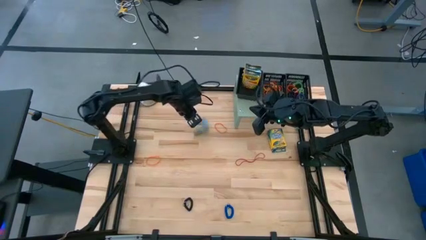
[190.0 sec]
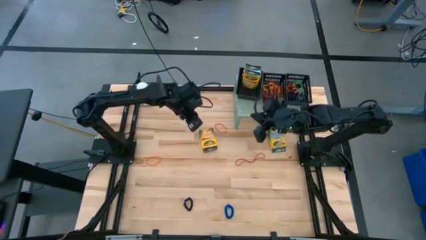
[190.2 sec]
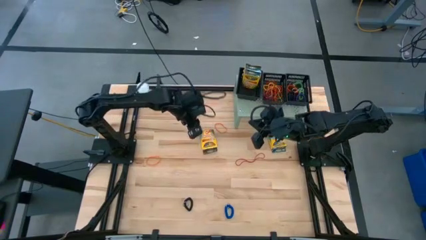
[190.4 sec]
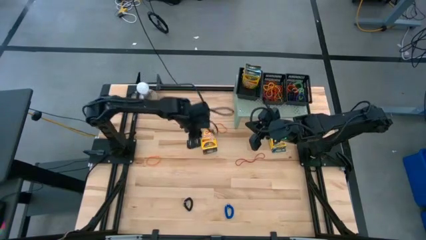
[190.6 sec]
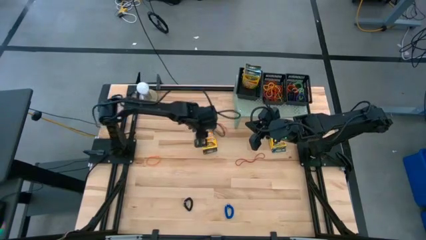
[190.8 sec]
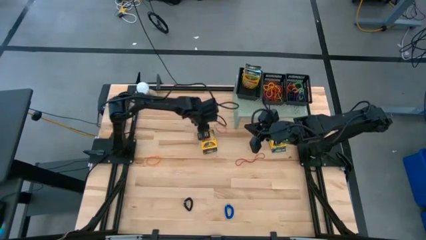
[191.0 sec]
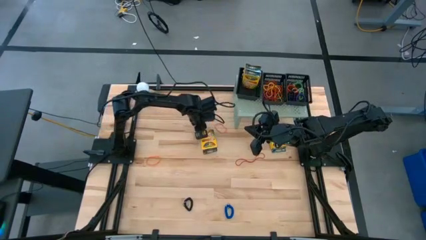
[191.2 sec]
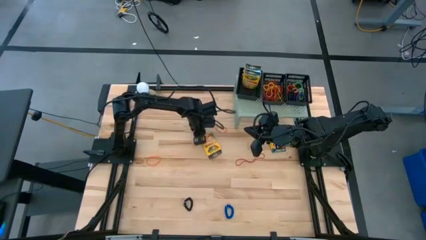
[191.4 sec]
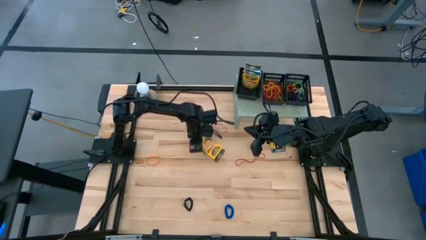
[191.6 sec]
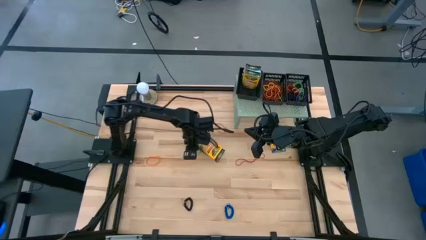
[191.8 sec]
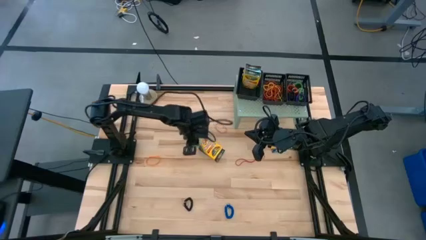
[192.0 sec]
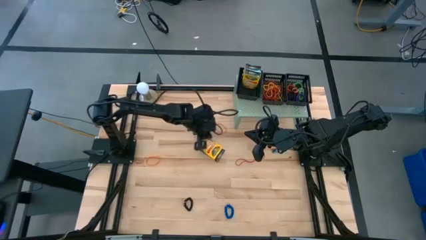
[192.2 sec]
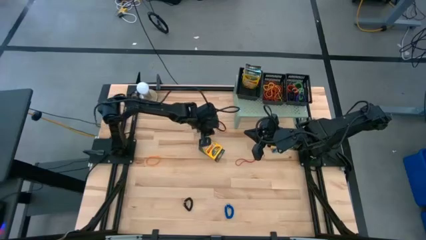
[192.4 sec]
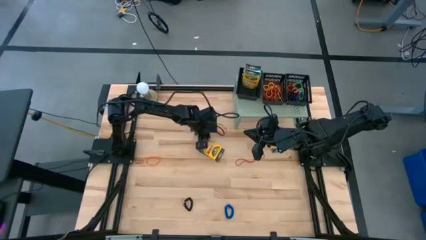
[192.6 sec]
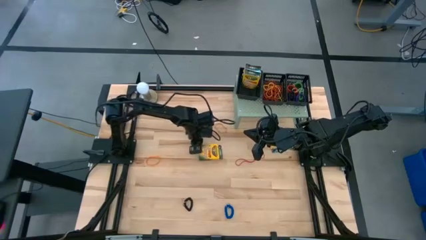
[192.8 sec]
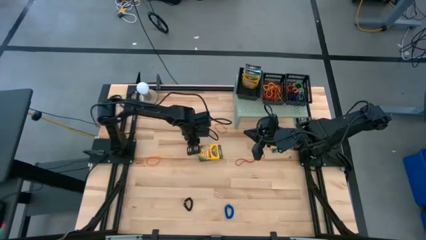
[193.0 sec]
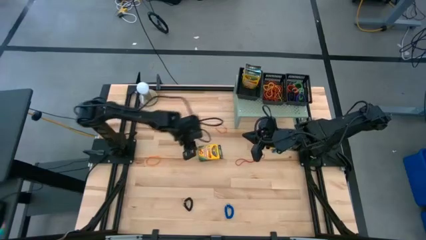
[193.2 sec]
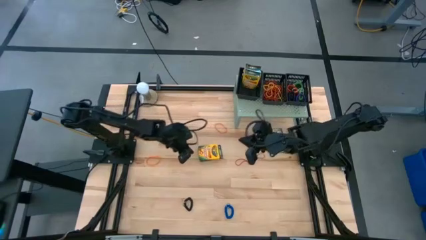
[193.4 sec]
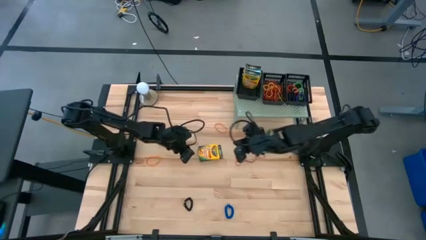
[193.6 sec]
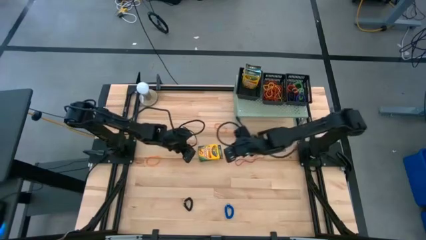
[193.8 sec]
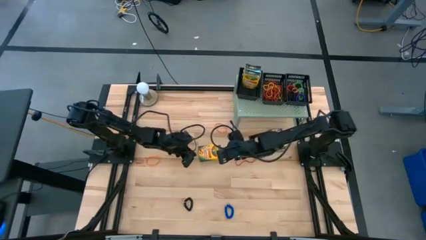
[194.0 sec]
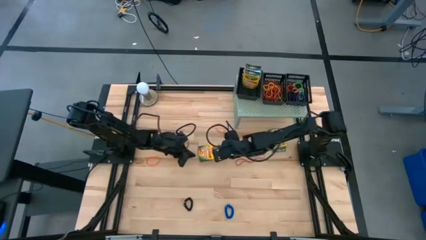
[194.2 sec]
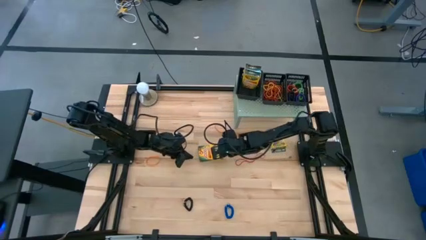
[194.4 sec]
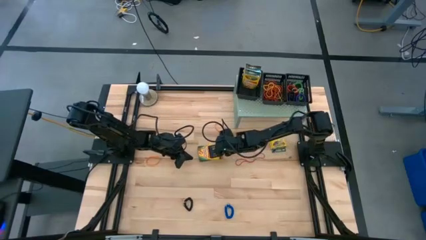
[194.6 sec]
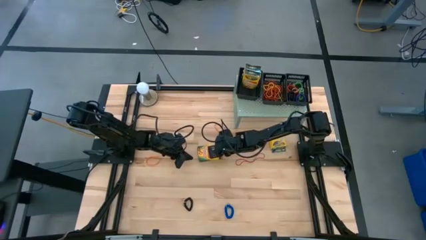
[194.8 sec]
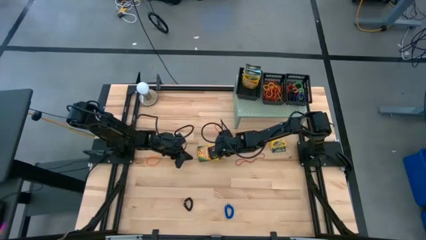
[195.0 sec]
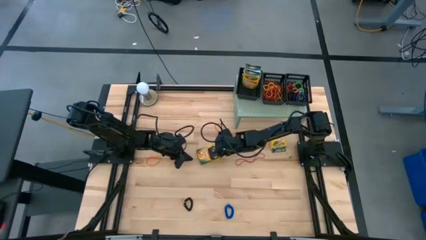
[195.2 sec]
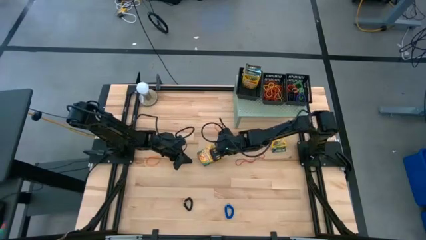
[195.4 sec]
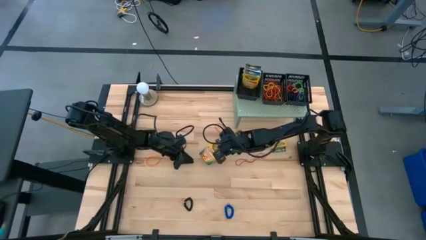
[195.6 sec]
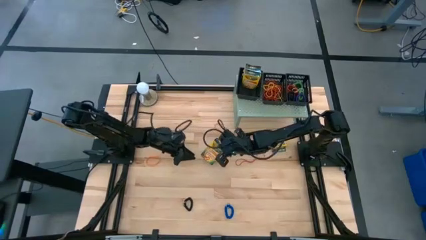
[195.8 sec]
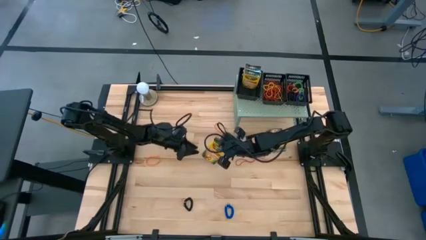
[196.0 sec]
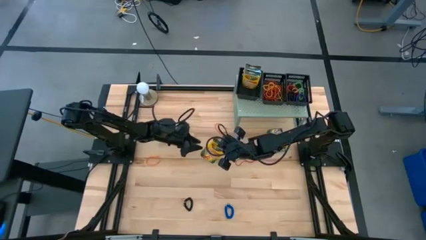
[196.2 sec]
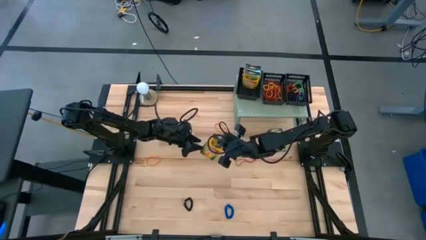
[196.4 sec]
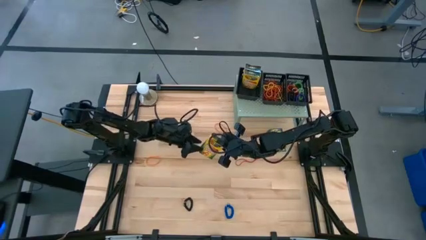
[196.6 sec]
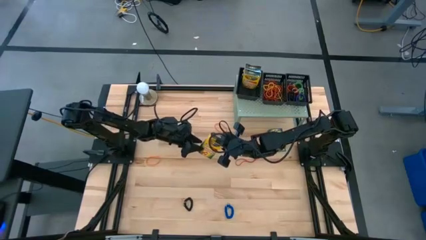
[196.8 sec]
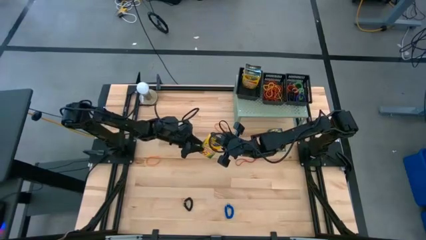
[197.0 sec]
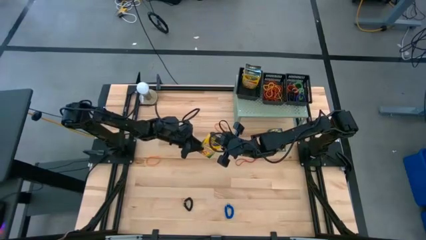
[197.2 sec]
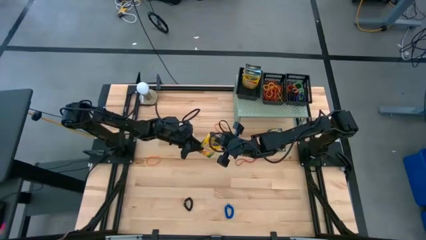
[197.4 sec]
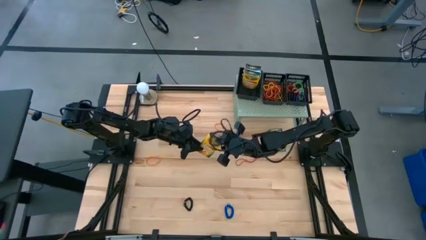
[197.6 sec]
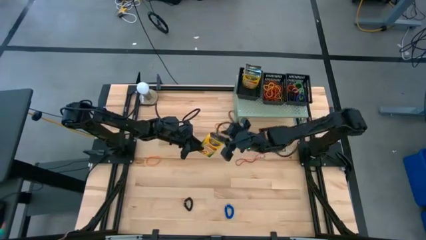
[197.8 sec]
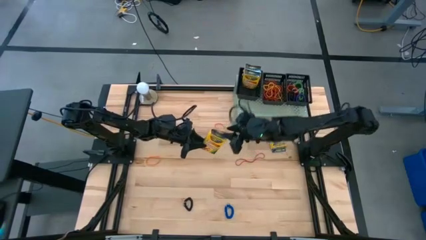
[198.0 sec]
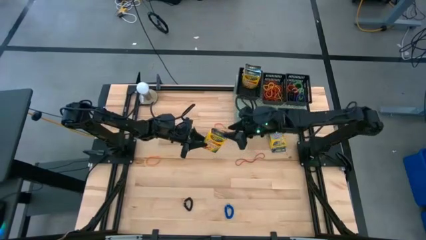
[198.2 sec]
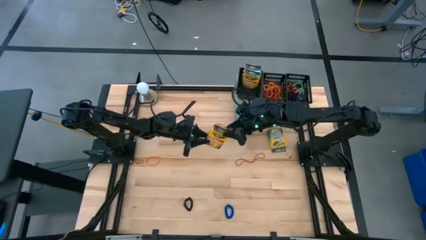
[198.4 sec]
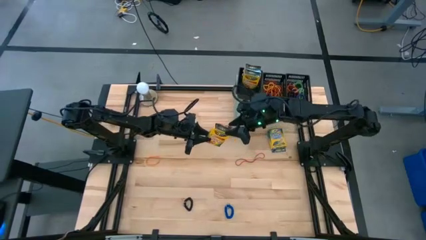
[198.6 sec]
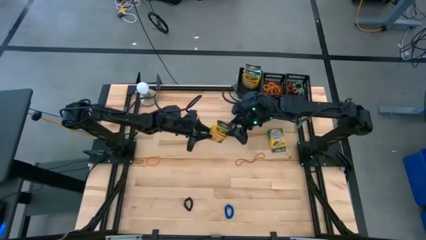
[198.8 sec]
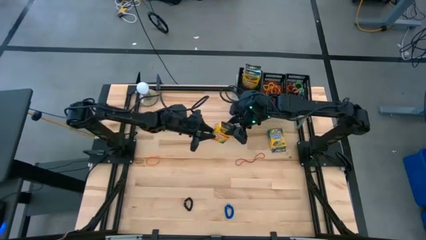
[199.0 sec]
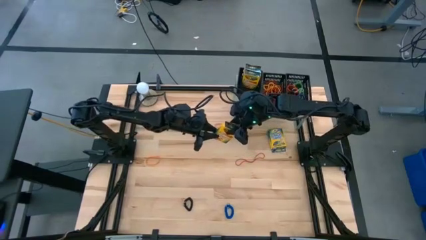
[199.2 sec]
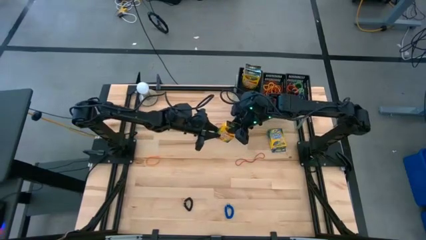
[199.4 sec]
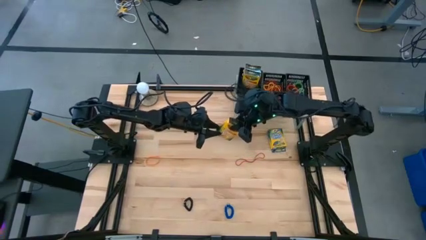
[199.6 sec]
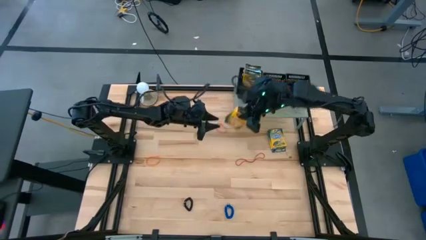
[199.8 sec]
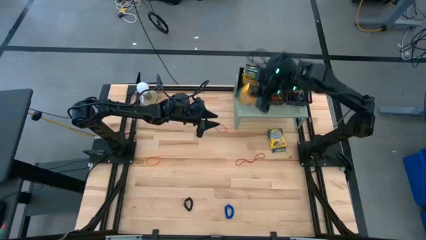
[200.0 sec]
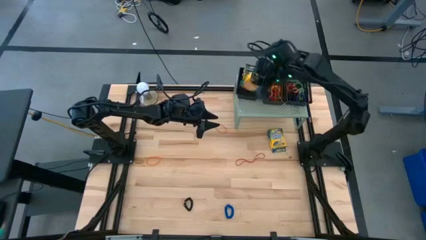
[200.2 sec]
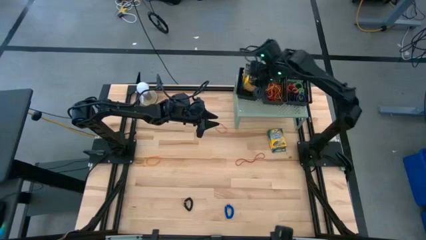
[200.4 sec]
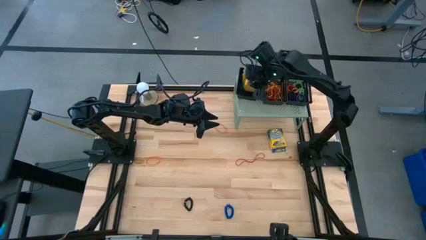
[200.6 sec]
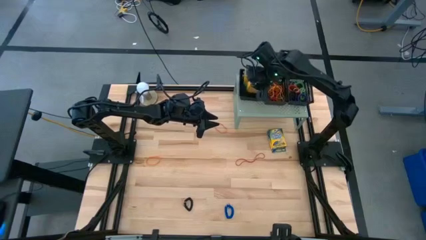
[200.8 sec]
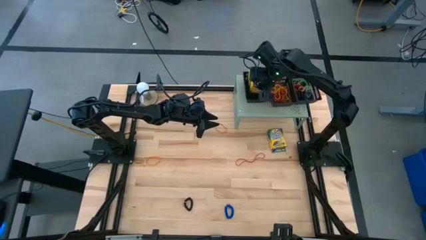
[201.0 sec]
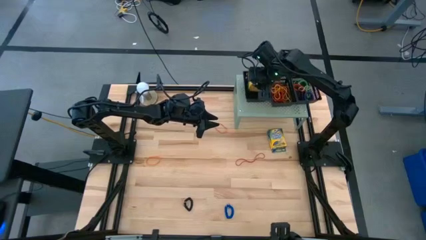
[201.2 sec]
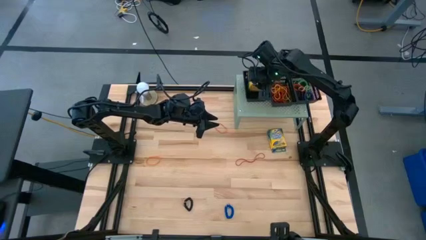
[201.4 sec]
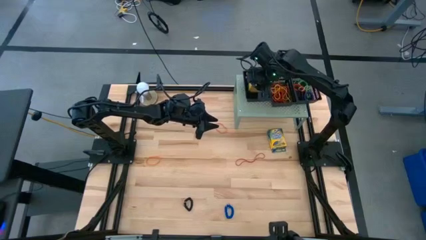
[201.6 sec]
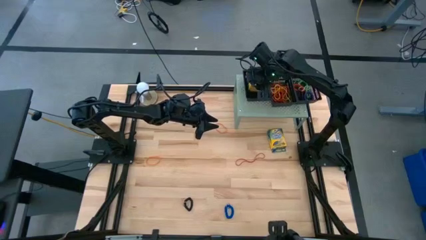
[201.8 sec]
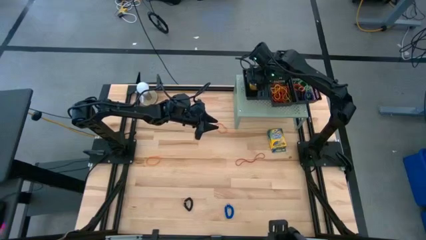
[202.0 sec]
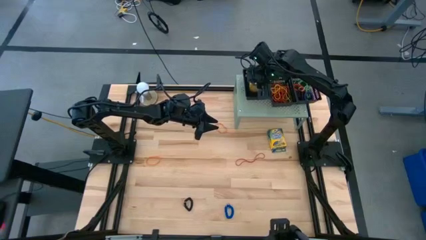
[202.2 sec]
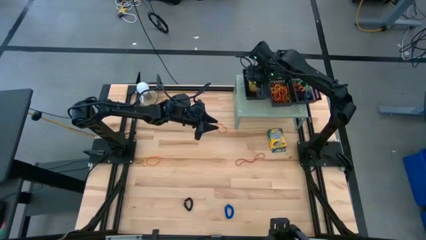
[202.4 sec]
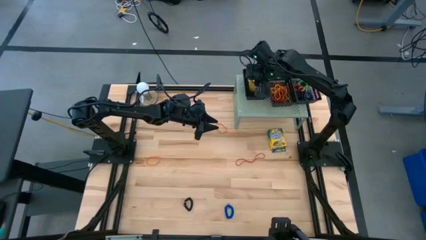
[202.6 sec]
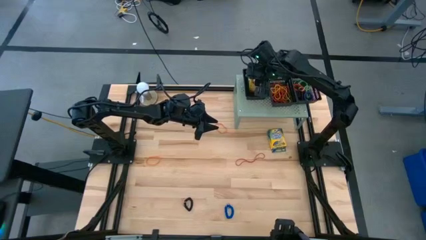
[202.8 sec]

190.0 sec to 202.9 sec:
Task: Pick & Place Office Desk Supplies
Put the top yellow crayon box into the left black basket on the shelf

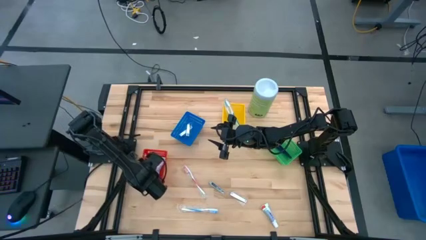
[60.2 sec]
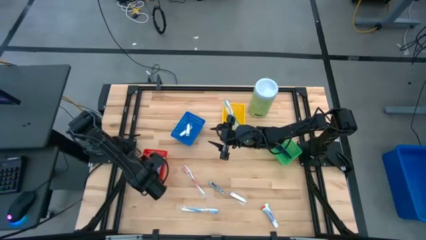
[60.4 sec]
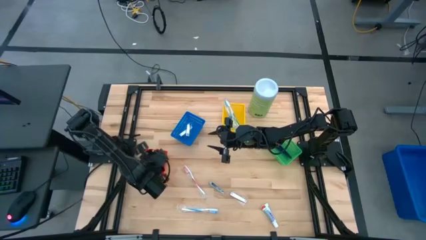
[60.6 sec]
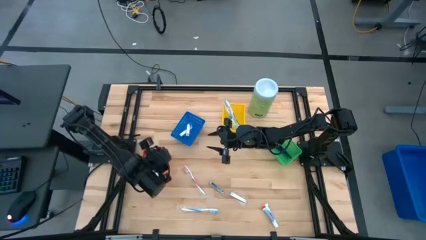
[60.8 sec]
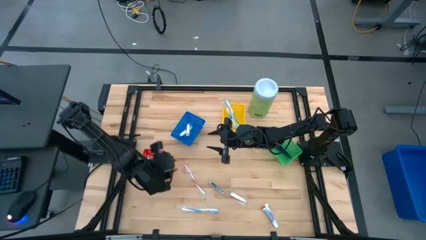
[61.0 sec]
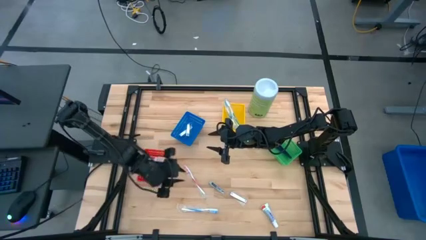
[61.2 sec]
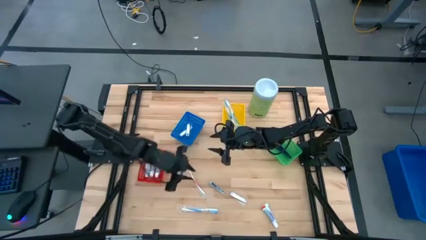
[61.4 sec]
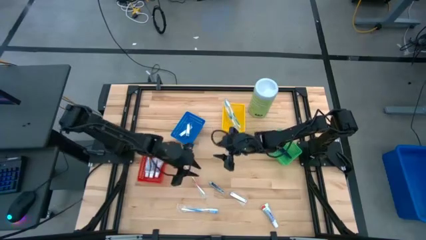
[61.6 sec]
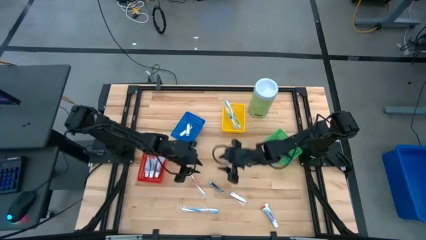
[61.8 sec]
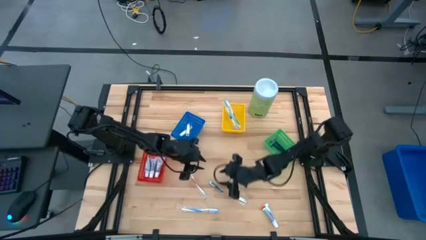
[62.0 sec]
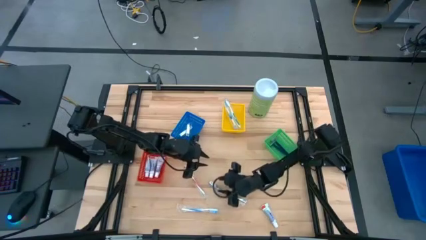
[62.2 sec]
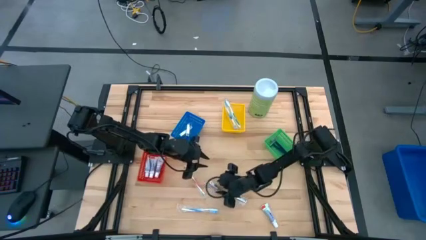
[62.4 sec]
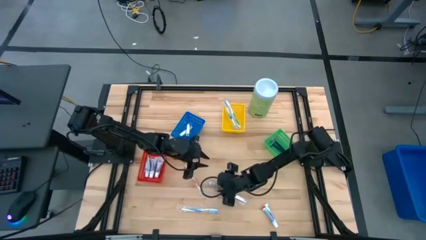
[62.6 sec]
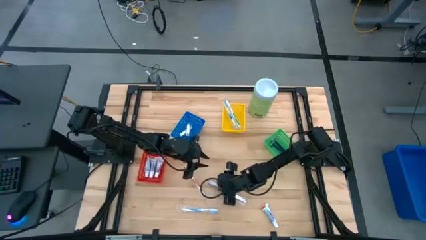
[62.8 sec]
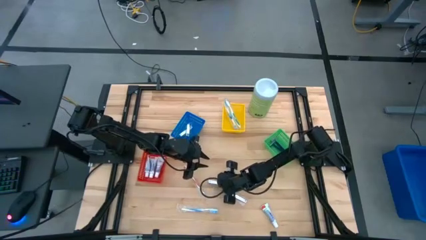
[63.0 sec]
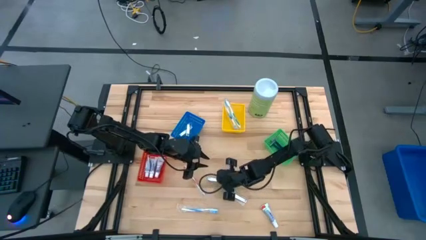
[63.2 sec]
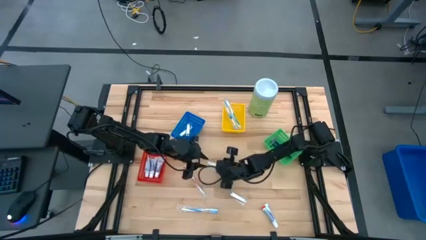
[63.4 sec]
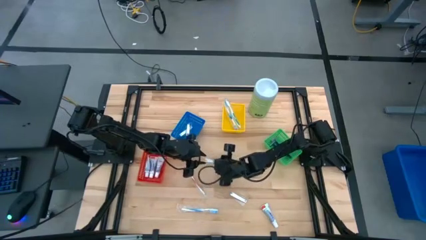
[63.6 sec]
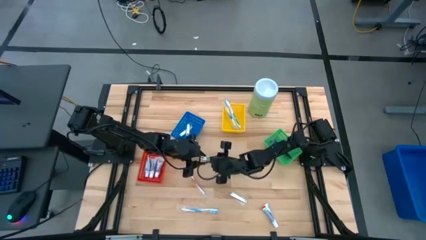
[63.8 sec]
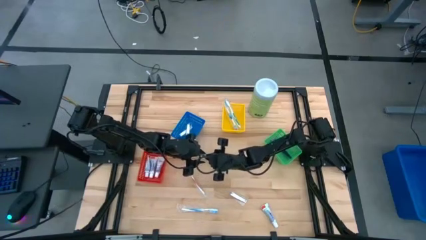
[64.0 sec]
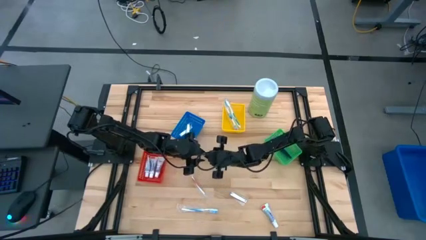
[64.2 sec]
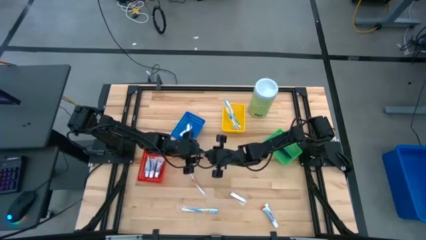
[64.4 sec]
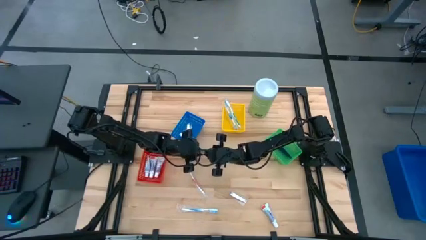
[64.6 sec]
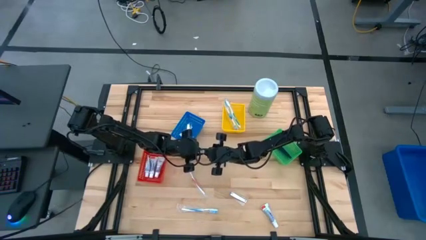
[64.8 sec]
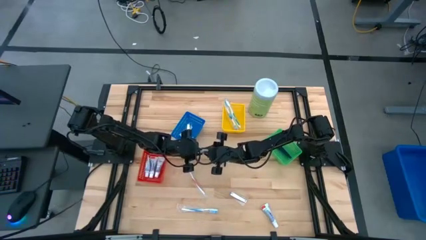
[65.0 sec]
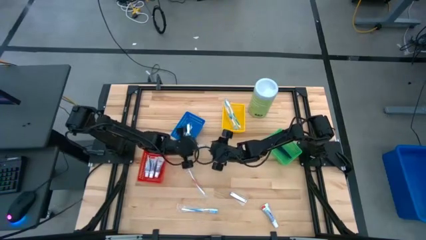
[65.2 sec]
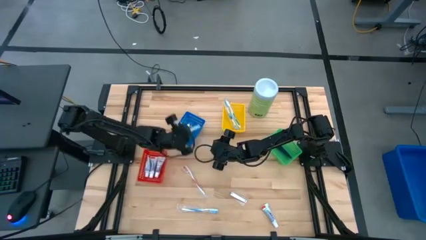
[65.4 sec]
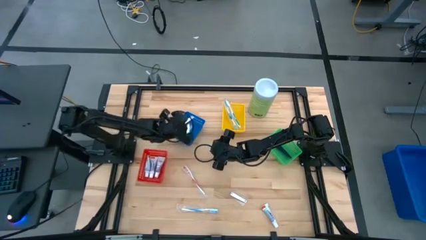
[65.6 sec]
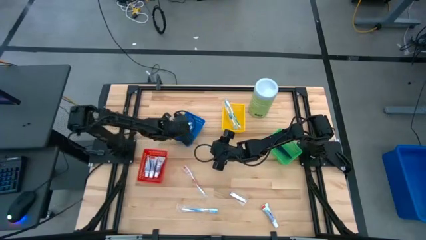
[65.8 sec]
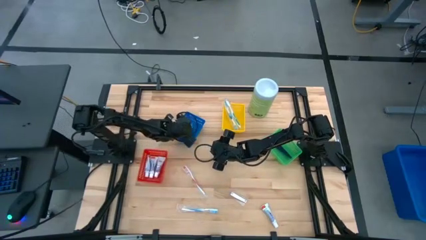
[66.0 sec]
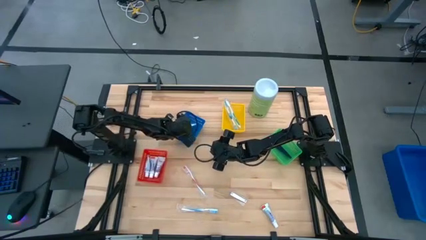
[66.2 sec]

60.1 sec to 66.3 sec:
Task: Pick & Place Travel size toiletries
Put the silver nail cutter into the blue basket
